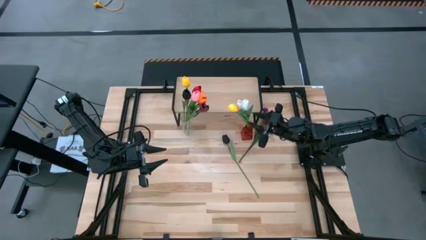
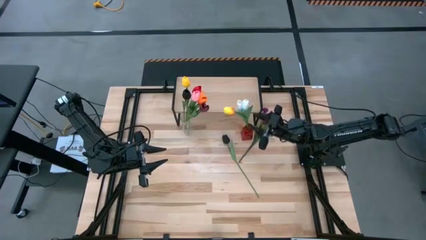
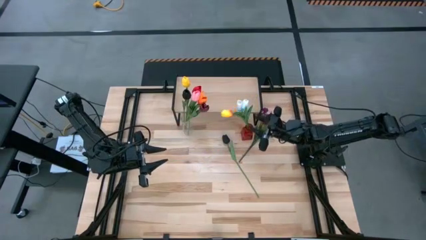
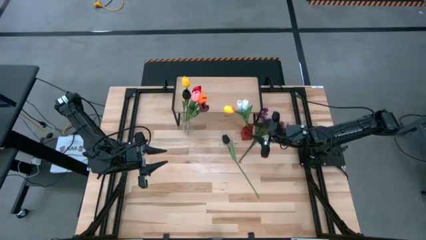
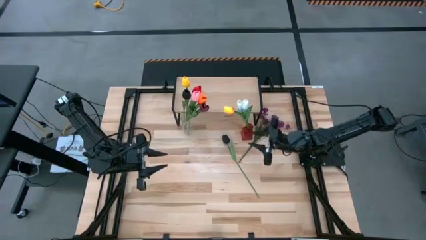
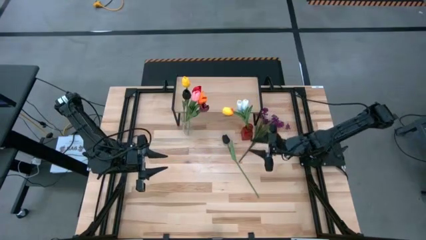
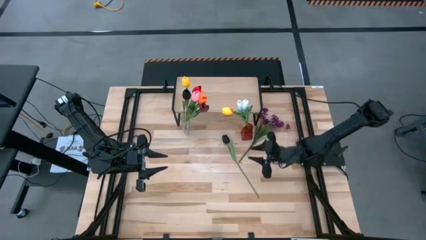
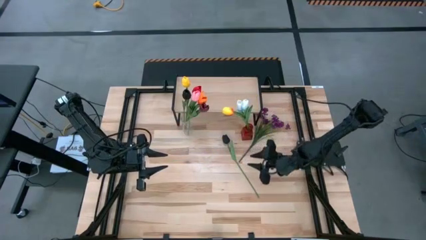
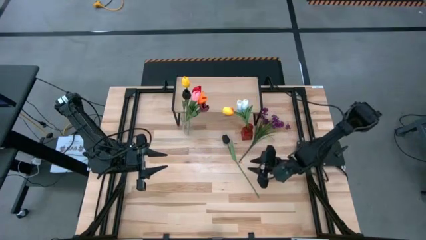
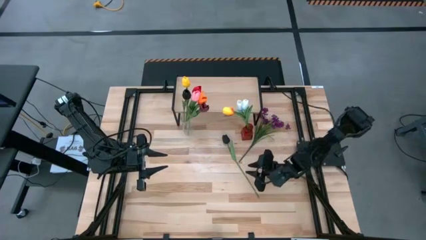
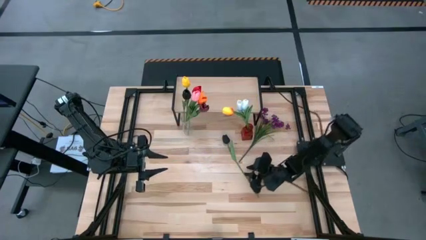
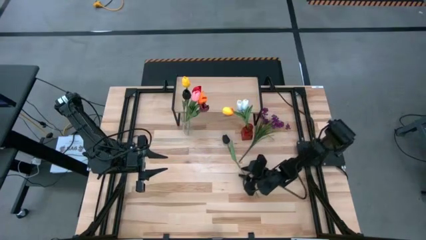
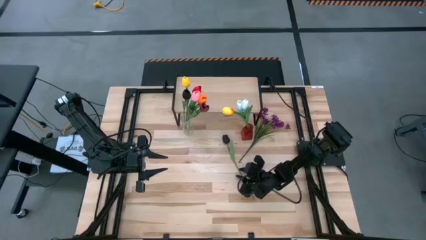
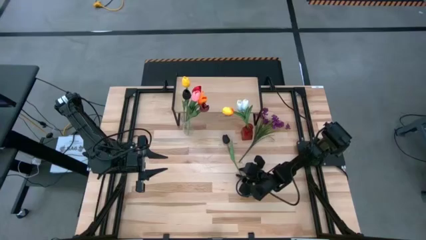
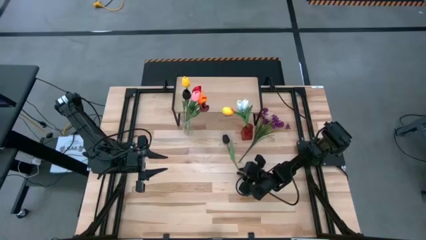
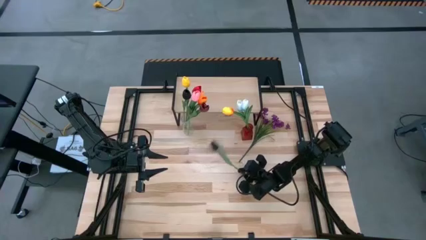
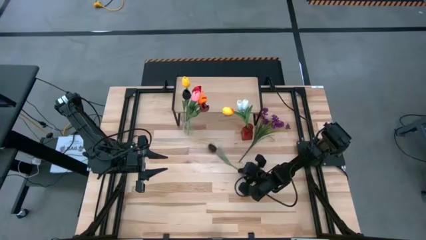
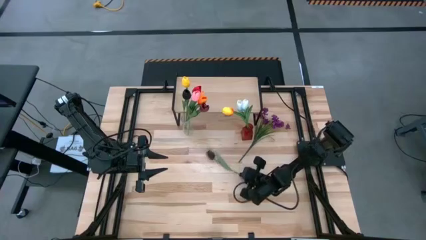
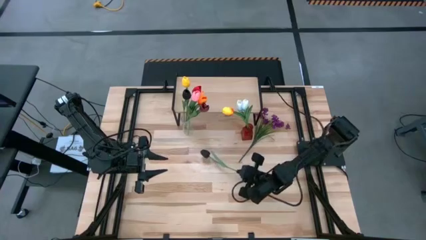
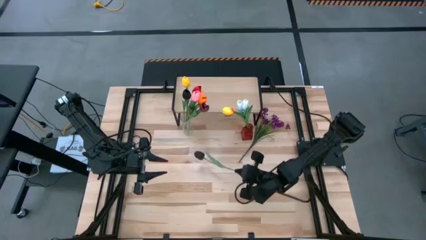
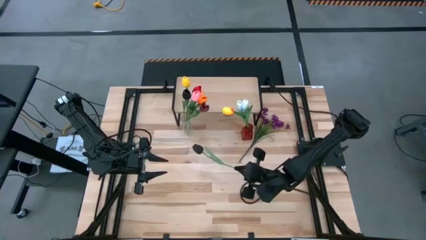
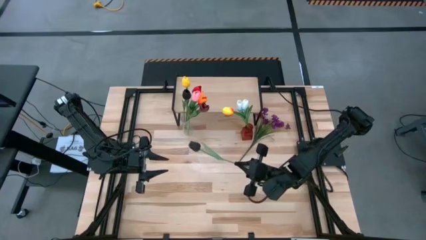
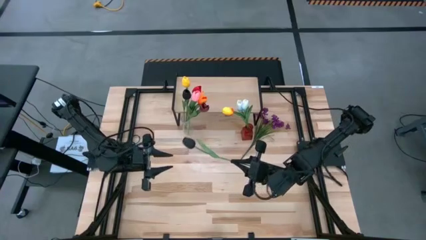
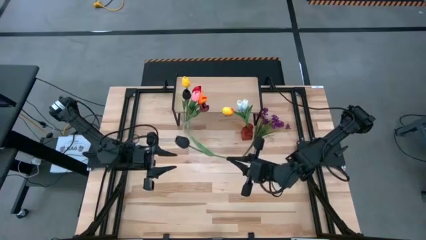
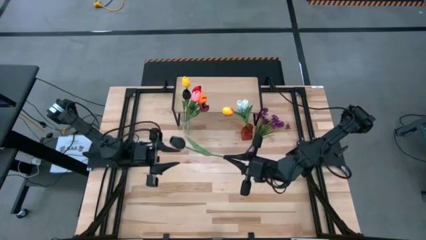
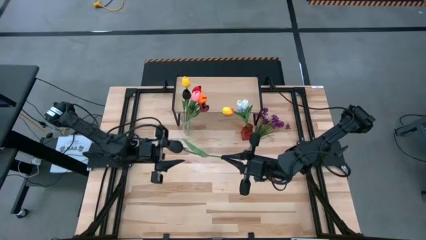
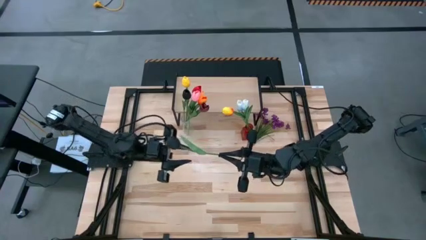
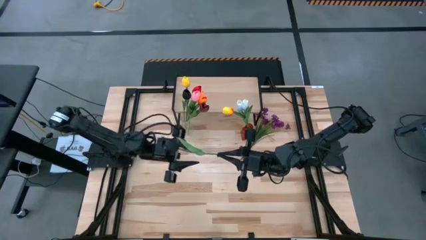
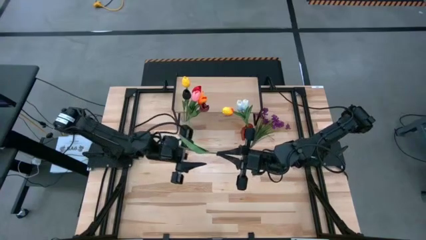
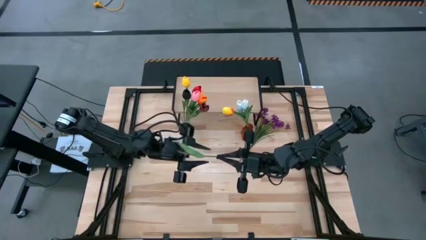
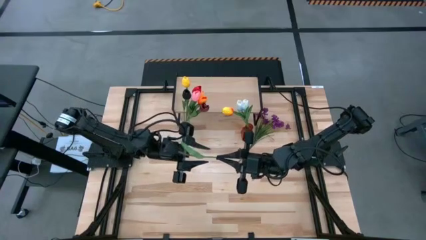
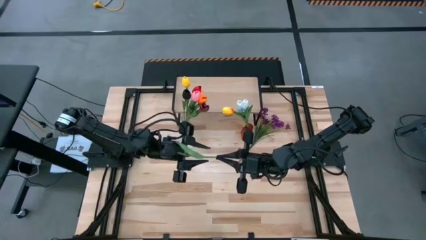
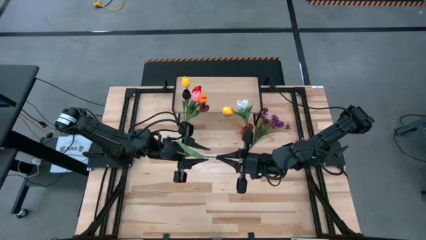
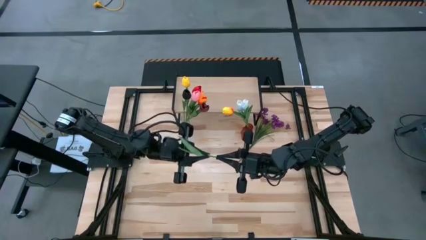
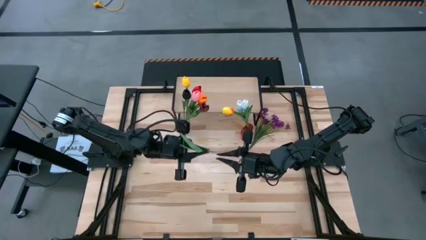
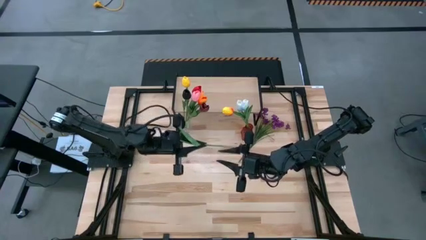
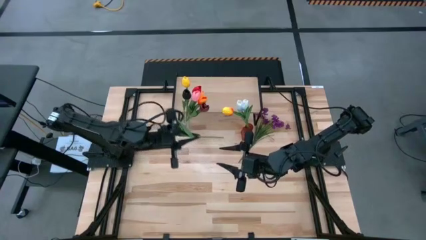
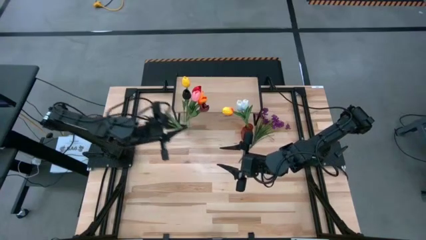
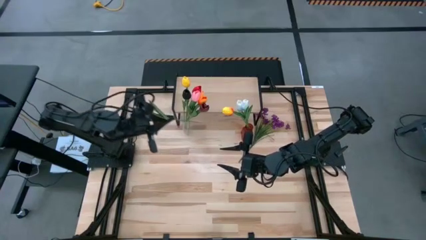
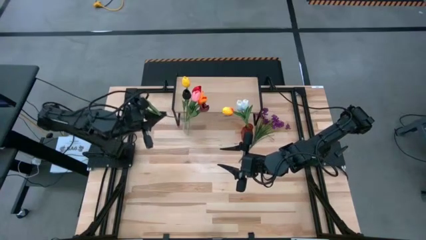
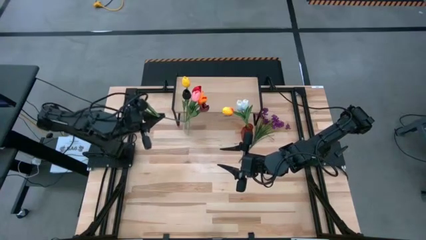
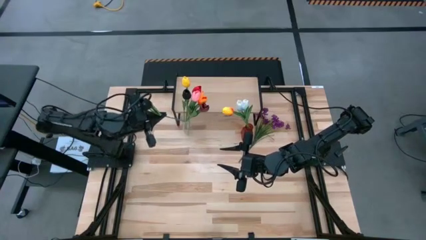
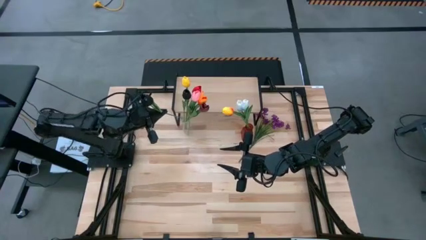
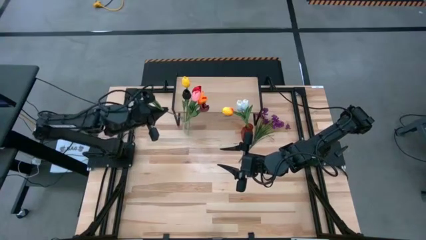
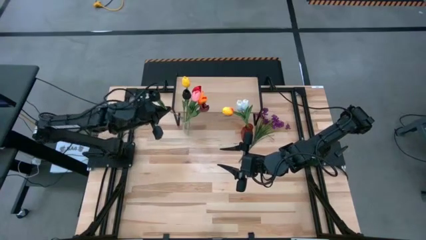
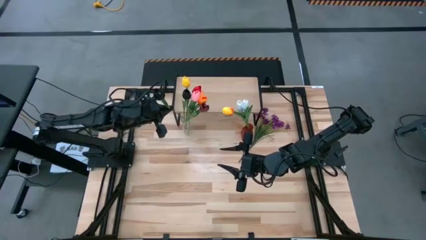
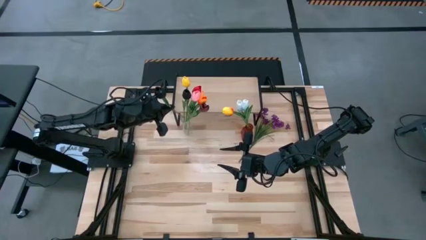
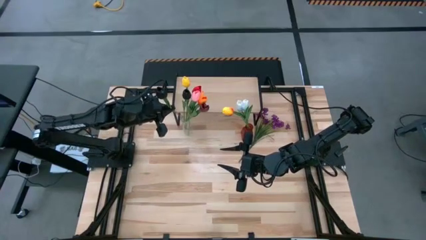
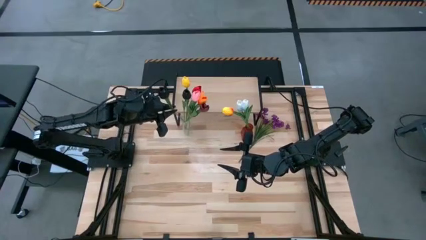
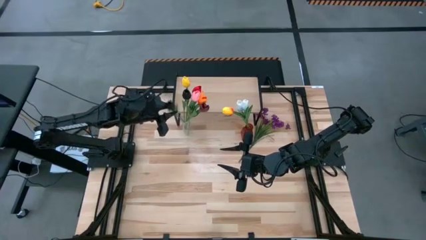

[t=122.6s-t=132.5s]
Task: Pick and place flowers into a vace then onto a shelf
Put the black flower into the transparent vase

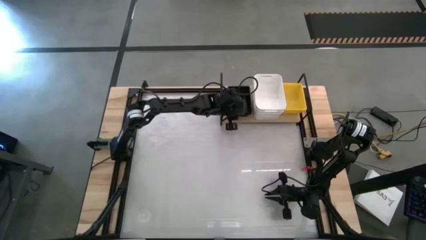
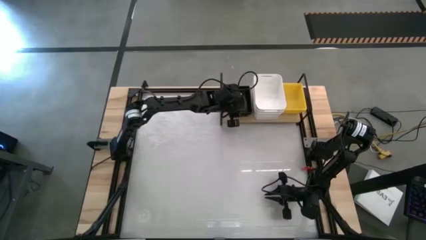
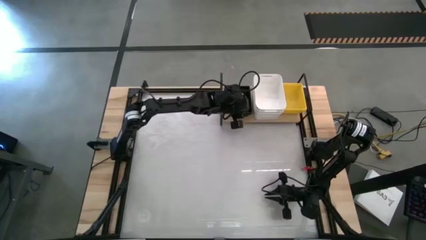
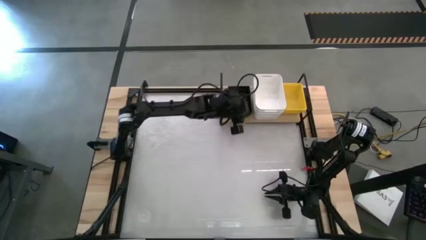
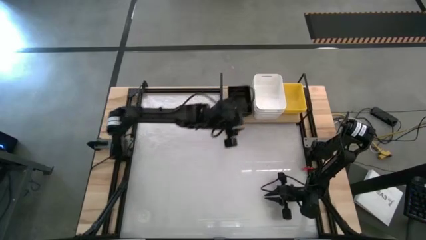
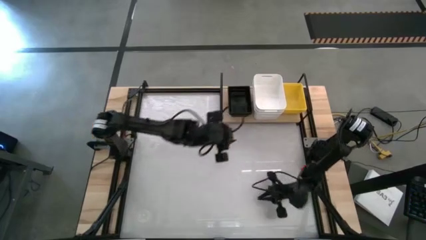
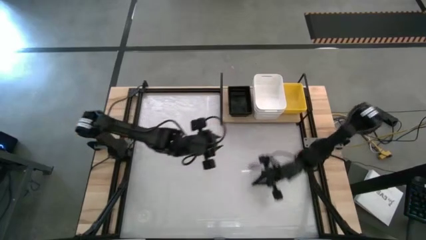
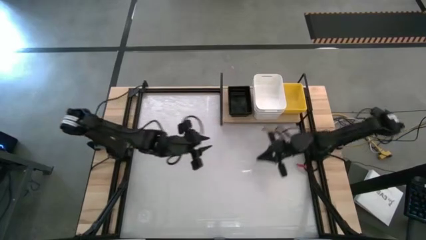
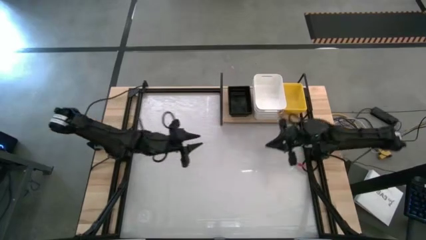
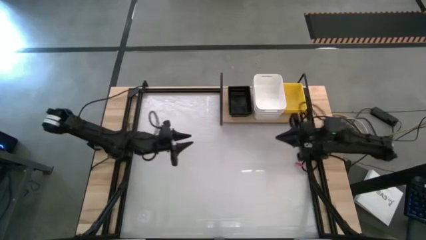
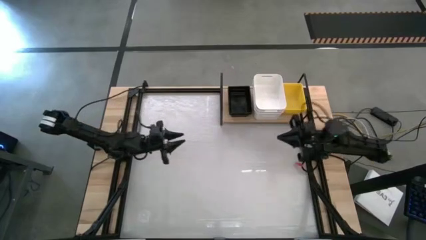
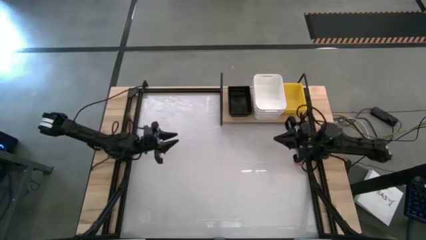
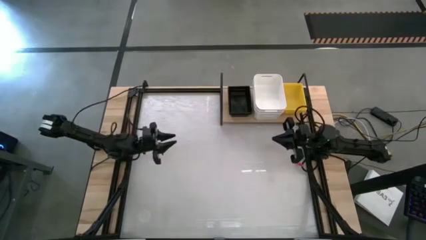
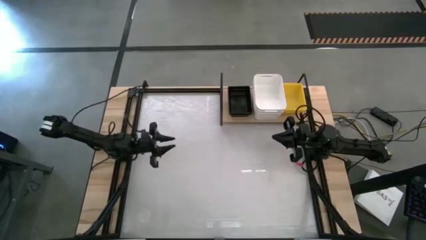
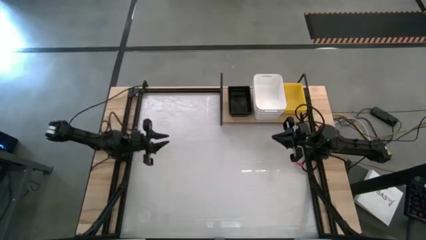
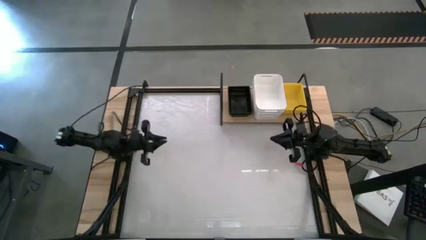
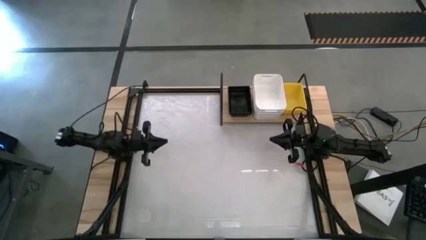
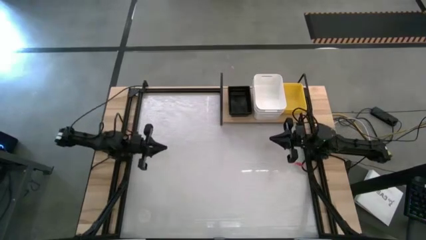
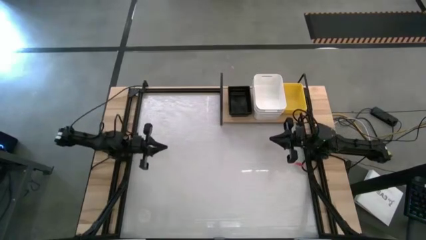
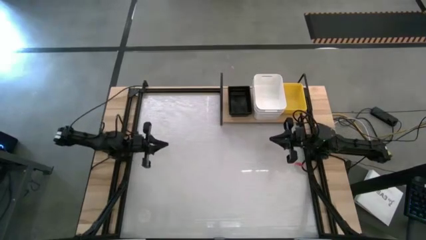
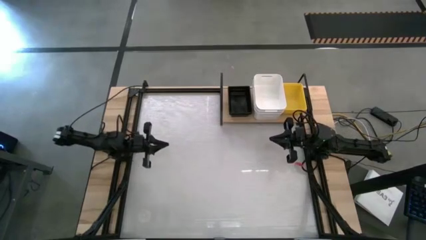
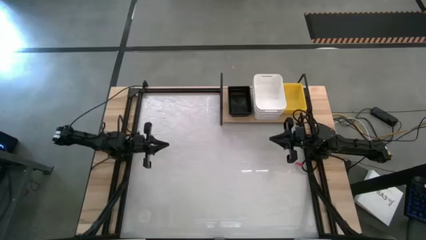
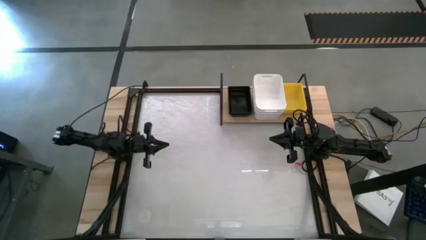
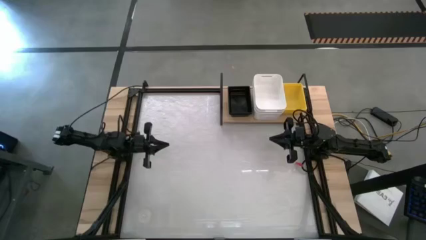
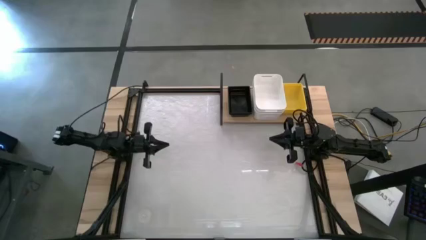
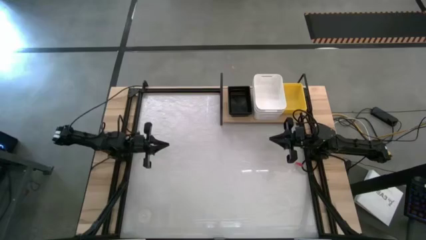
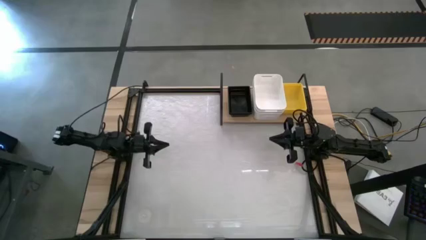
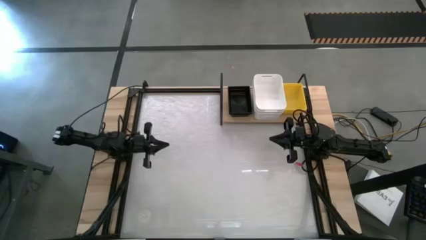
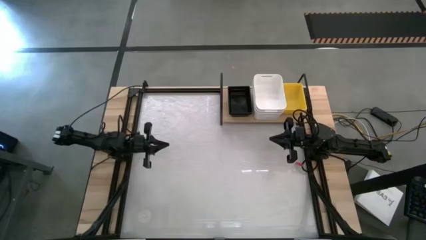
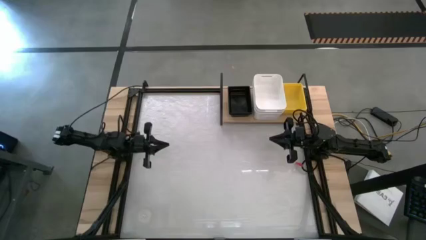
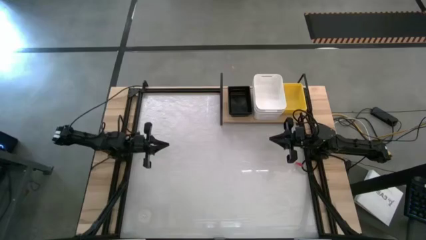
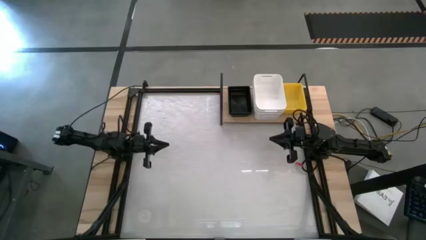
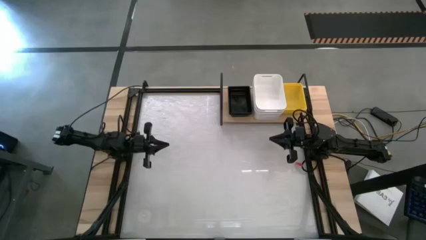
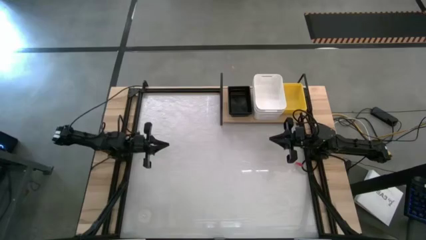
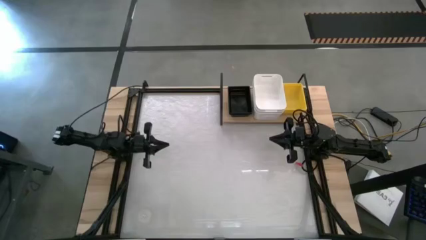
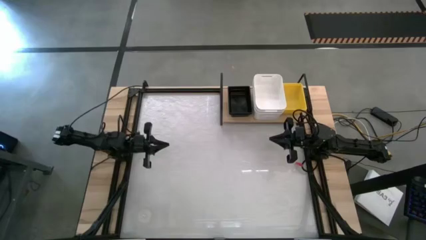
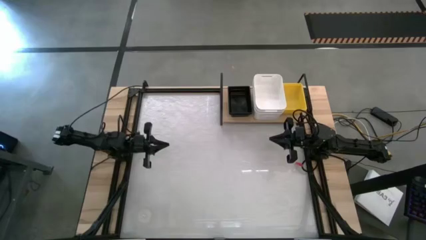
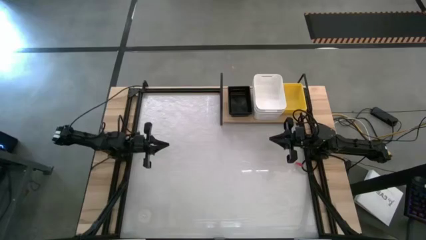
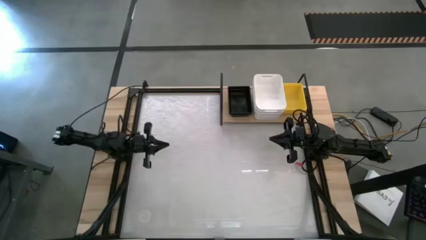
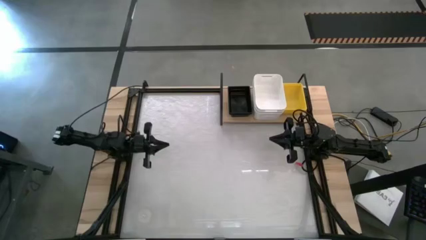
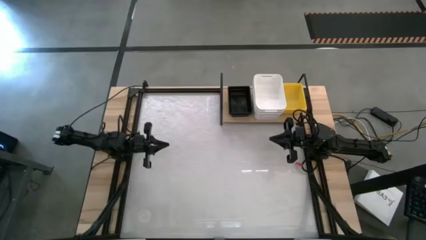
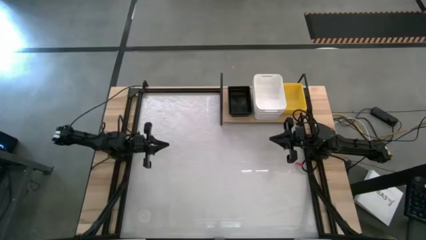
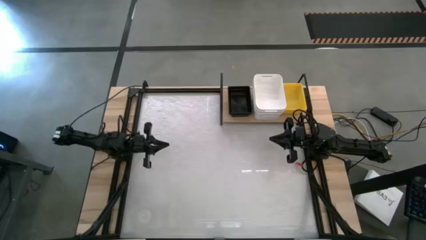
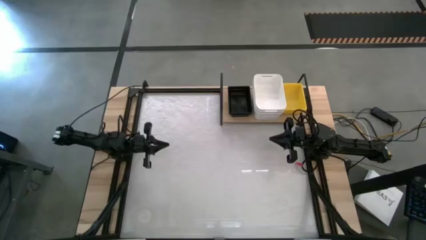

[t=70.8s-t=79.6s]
Task: Stack baskets on shelf by color
Return to Home Position
